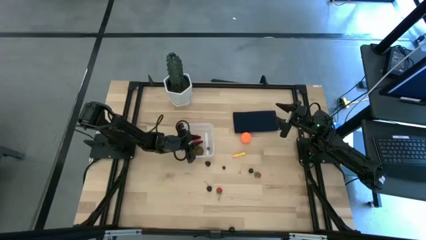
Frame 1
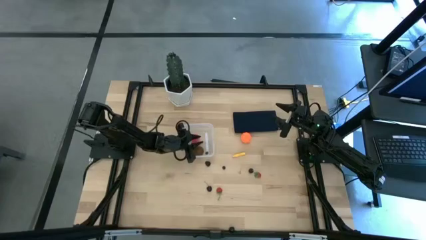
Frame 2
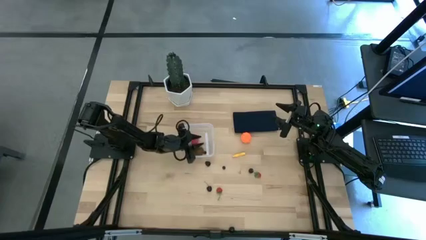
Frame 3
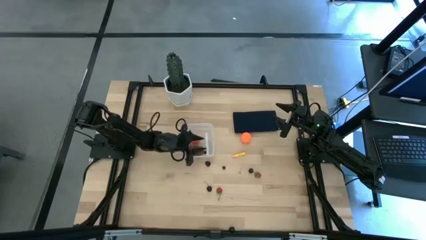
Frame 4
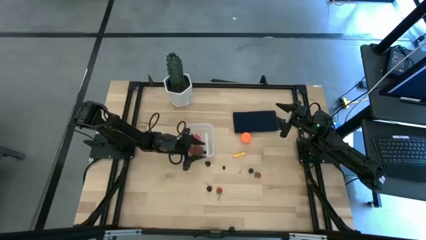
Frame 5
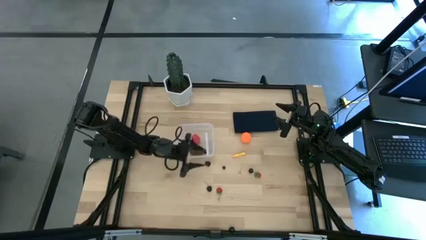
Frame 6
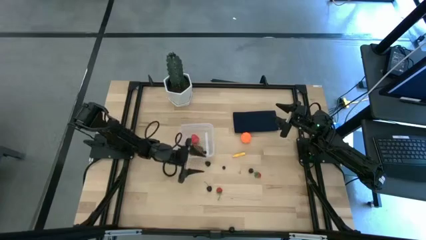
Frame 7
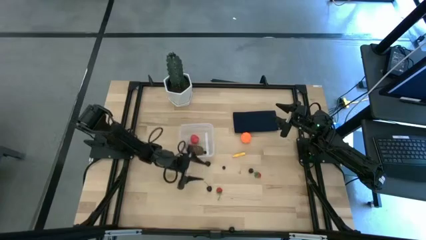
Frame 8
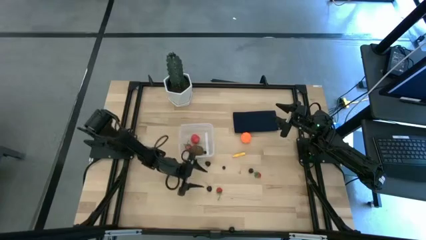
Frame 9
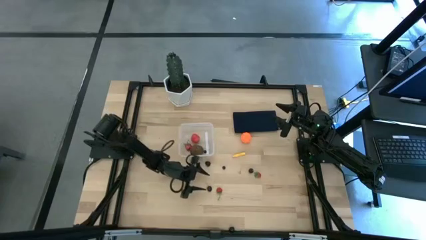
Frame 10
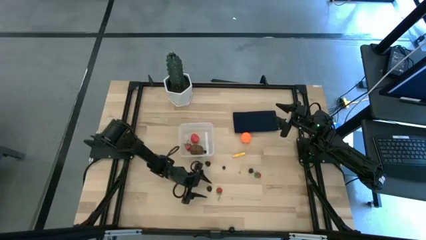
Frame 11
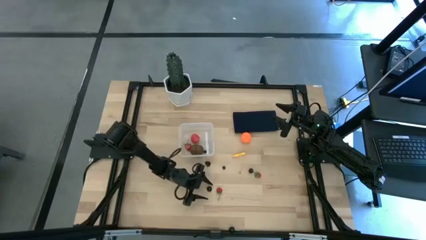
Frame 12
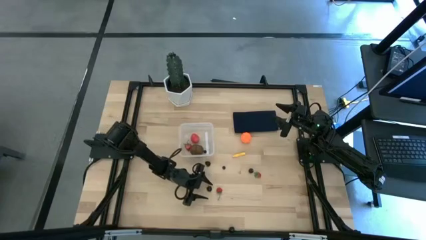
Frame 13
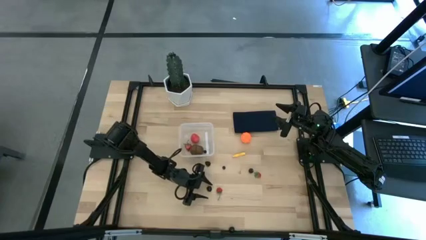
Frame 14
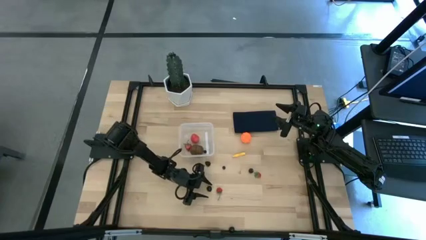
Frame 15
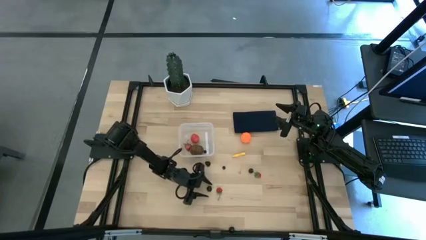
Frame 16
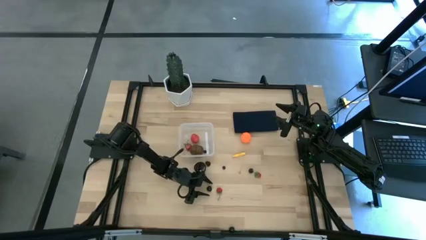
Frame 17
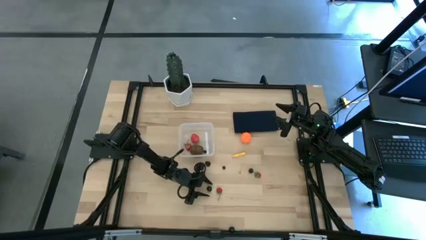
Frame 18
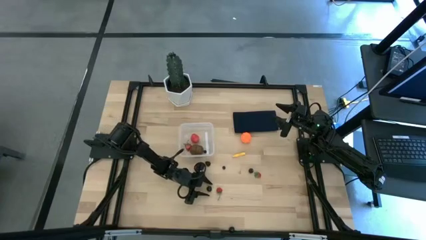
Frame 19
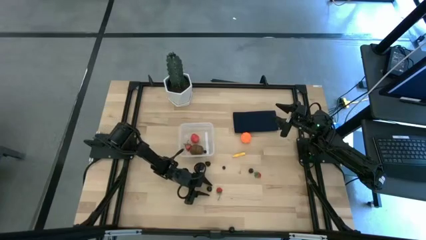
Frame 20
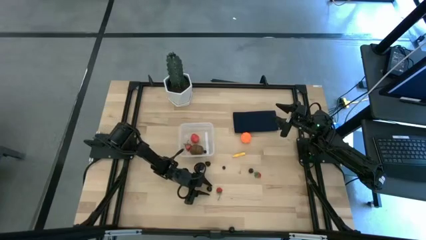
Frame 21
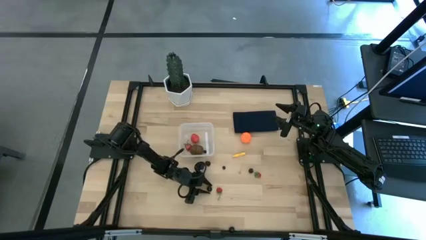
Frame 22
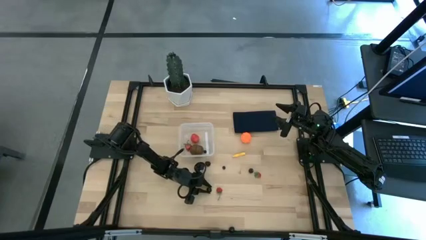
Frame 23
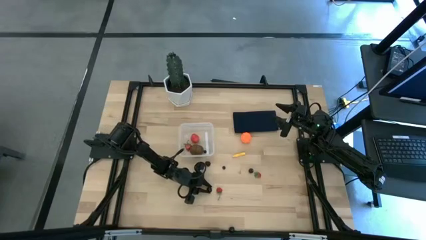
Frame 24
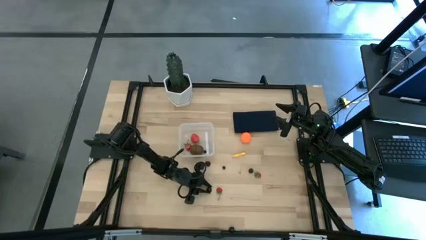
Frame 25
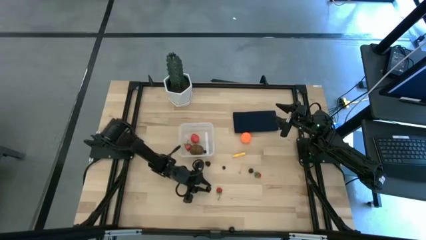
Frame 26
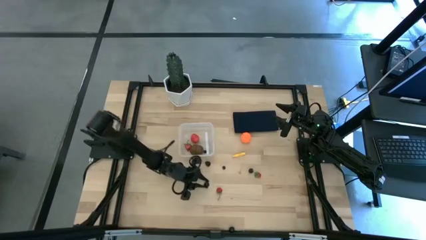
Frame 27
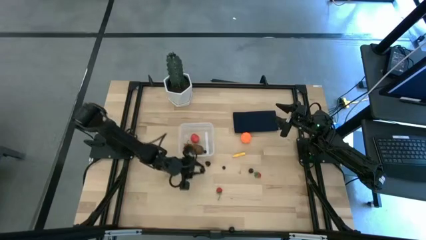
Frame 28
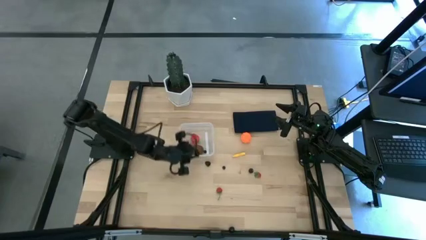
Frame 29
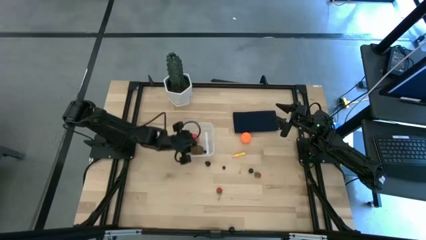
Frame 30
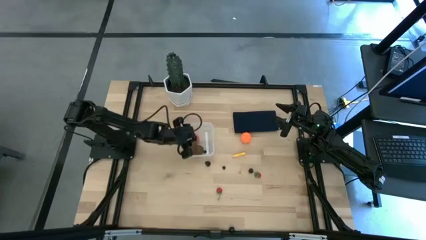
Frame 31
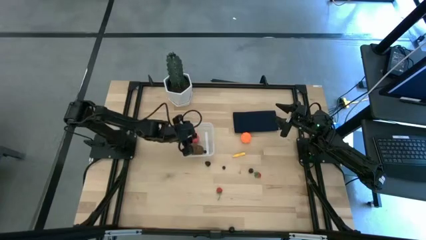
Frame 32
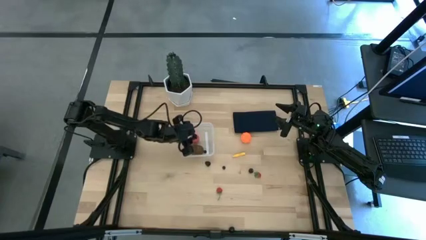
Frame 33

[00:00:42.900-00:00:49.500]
Task: Pick and placing Produce into tupperware
Put the top black cherry into the transparent container

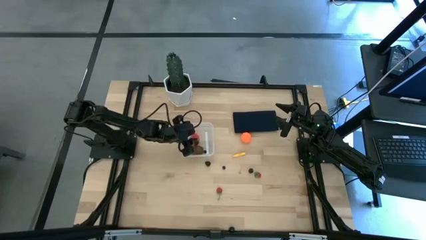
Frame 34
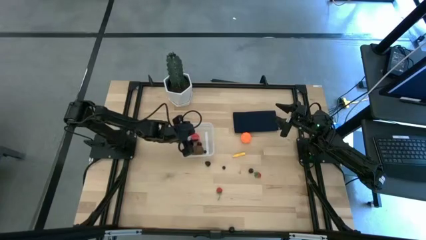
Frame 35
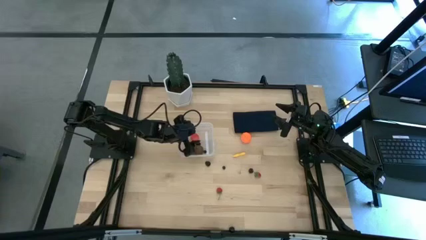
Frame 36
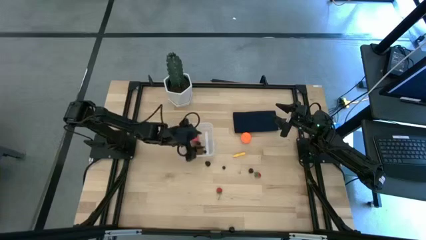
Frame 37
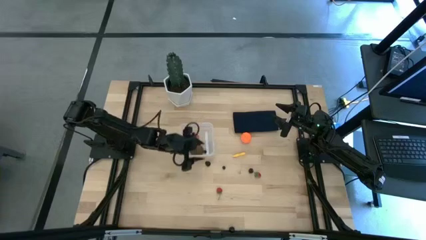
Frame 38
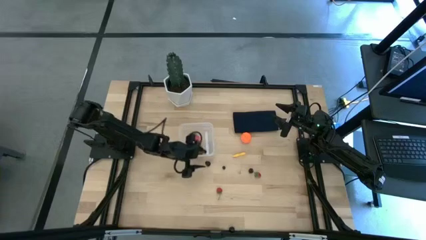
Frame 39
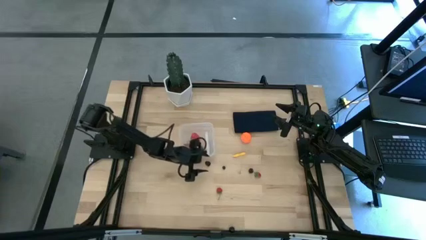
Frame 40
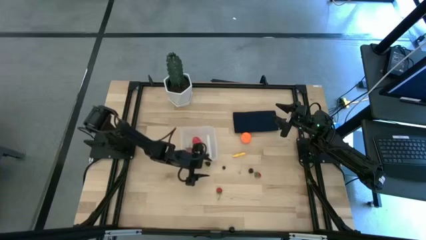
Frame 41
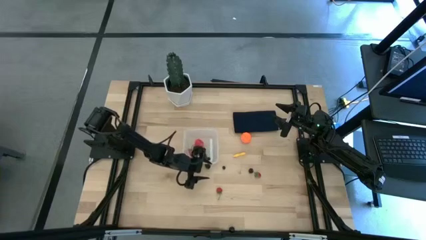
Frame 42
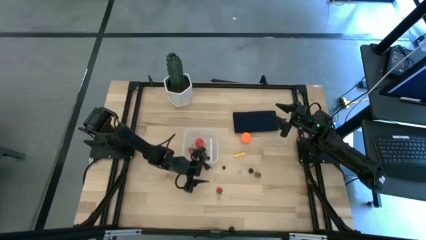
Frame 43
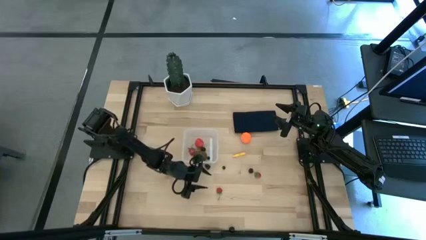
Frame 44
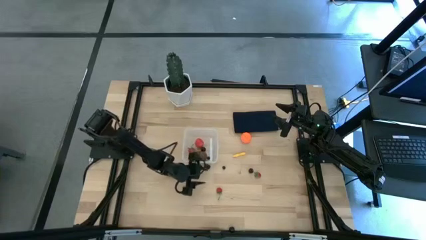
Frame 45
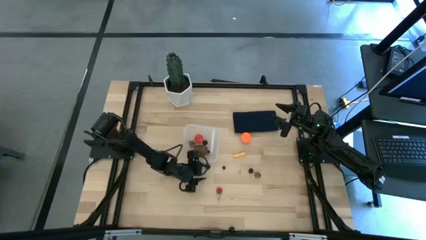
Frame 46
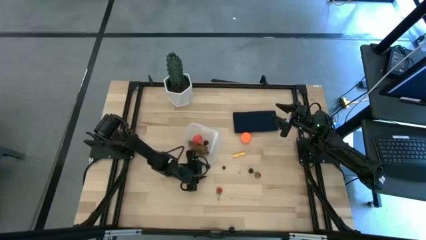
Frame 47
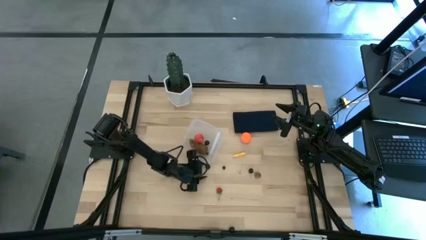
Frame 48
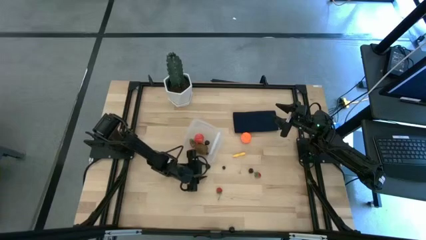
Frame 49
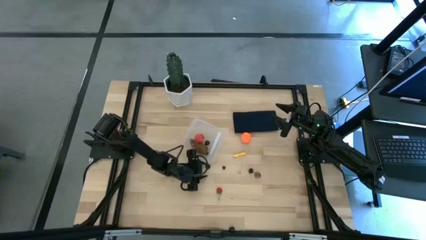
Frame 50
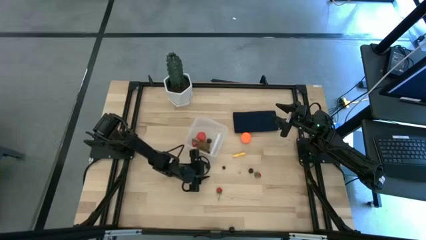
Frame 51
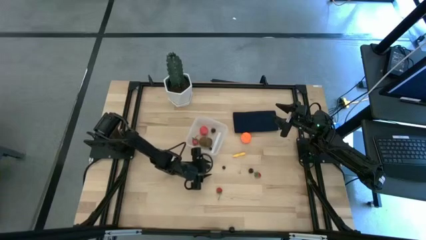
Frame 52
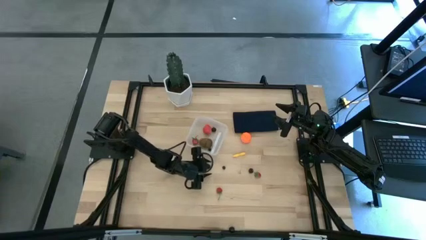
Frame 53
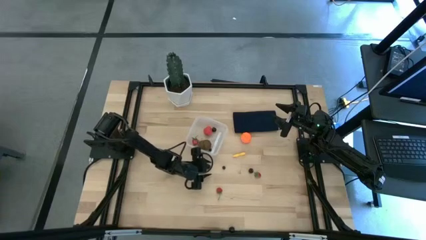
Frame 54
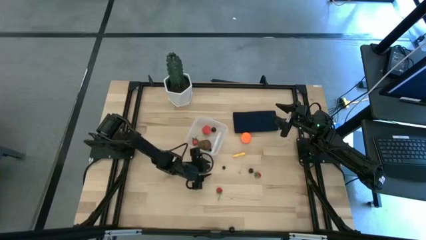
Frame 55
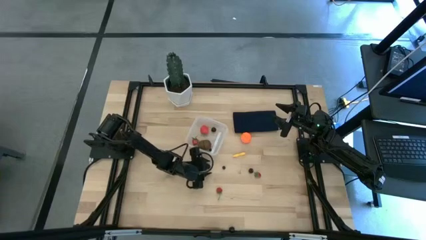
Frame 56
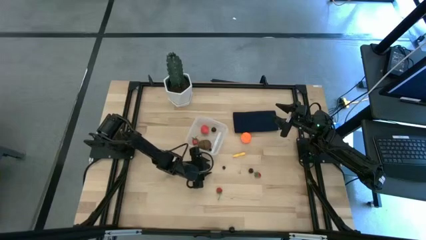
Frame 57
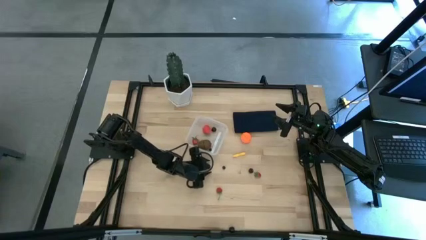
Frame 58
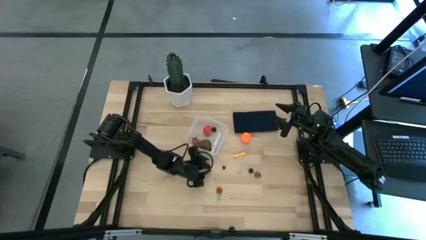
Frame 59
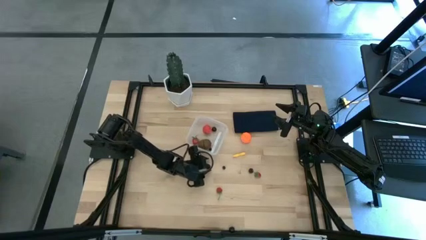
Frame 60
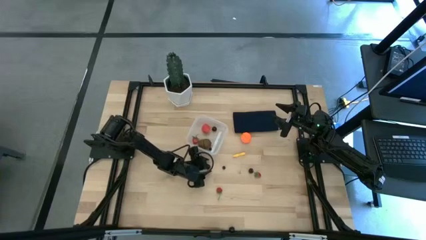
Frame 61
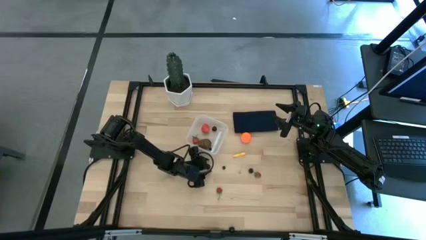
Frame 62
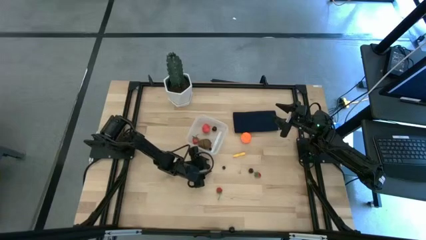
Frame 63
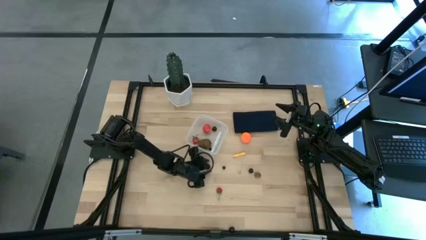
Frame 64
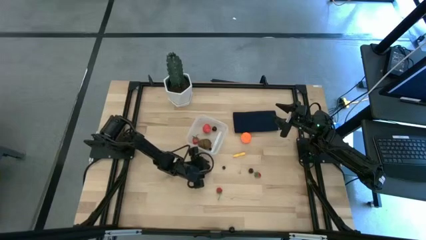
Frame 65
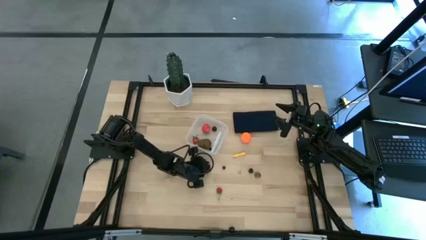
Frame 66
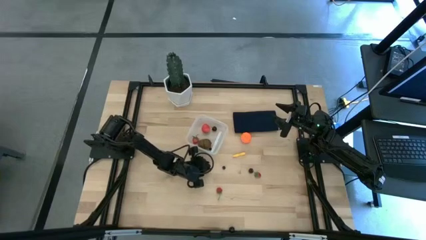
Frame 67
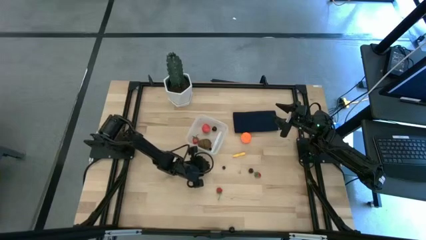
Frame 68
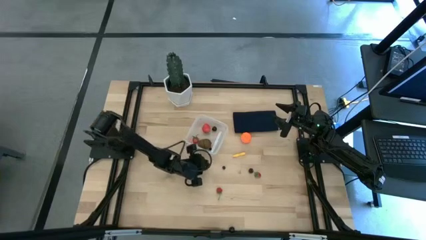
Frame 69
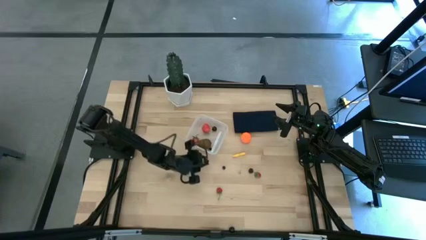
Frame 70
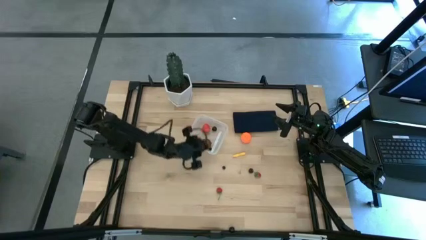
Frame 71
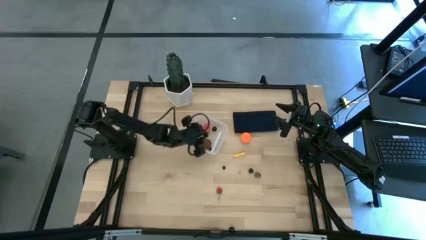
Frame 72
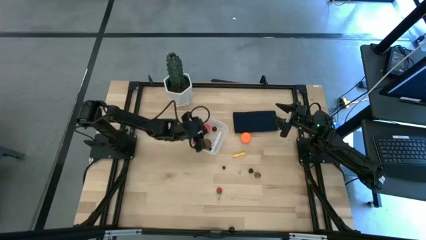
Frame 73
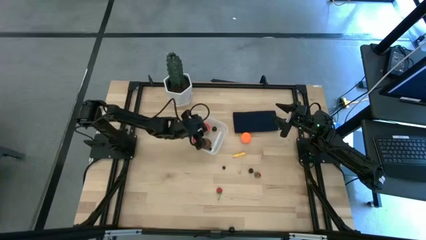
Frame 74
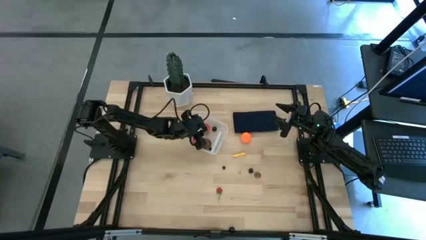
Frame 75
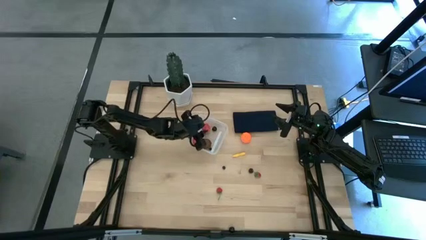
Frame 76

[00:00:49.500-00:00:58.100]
Put the left blackberry into the transparent container

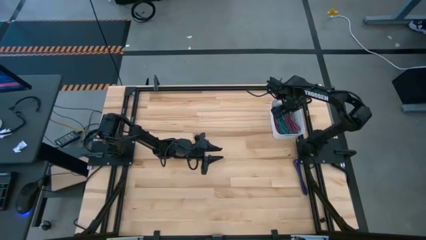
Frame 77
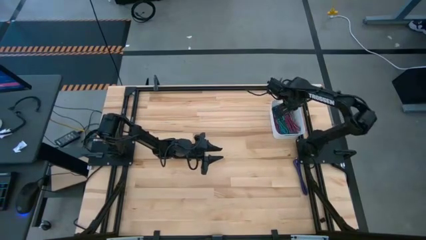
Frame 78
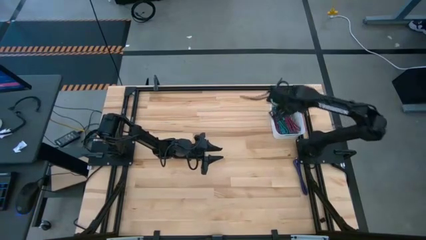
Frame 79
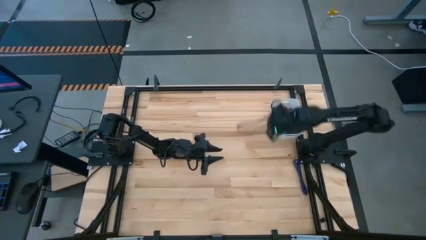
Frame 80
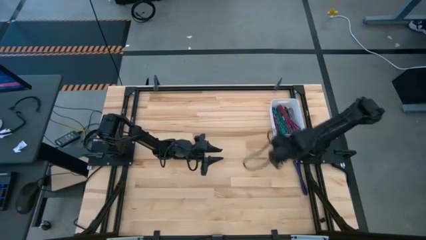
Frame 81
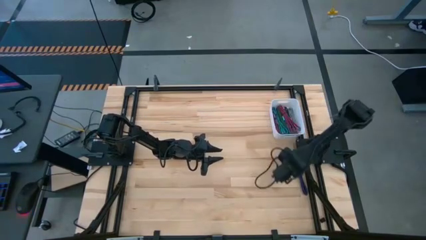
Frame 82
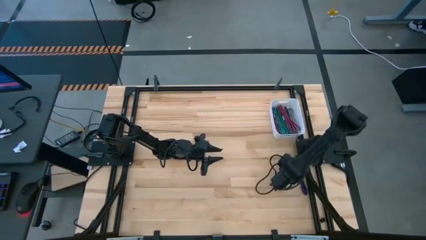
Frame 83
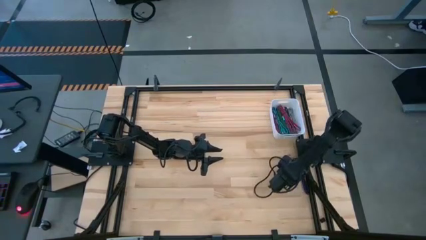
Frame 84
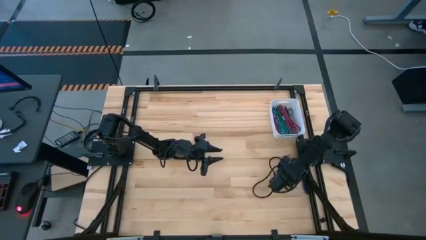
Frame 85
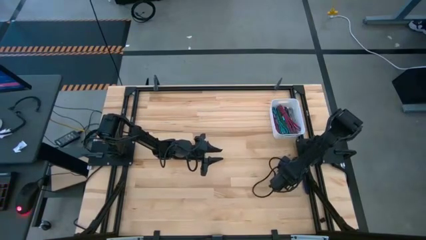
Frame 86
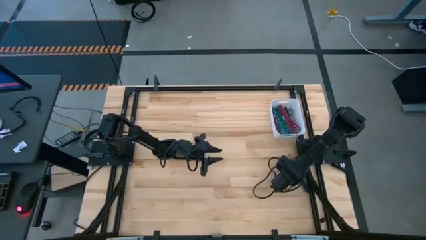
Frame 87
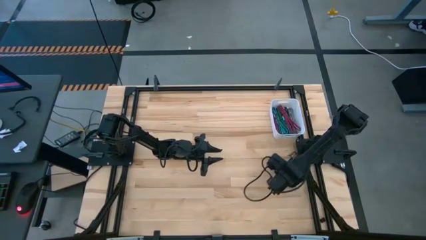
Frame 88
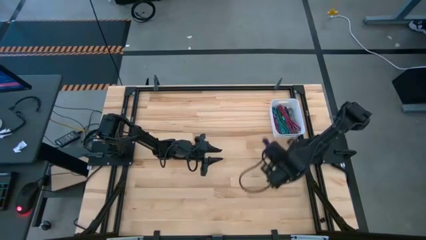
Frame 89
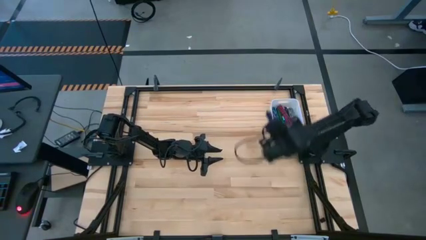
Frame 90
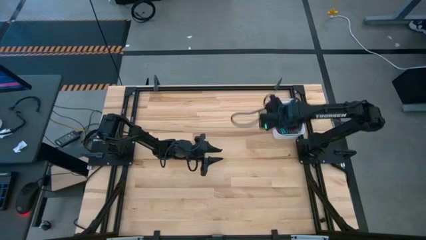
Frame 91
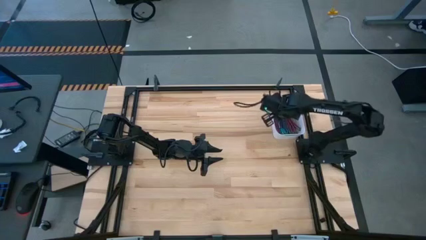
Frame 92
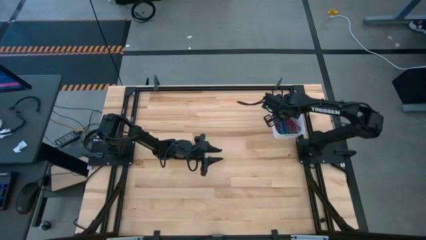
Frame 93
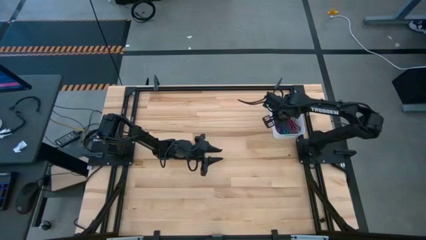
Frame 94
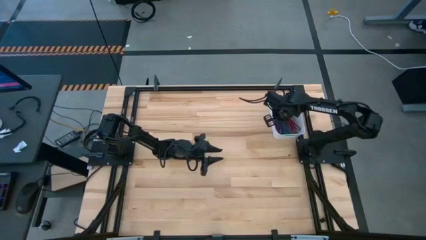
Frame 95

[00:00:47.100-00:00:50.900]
Task: Pick and place USB-C Cables
Put the violet charger cable into the white bin
